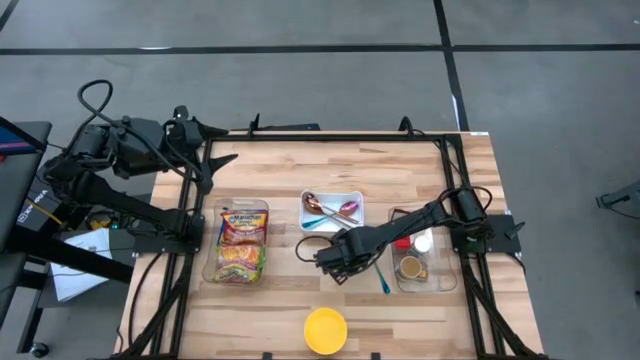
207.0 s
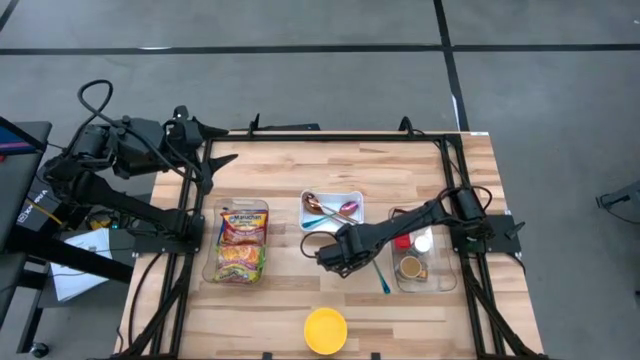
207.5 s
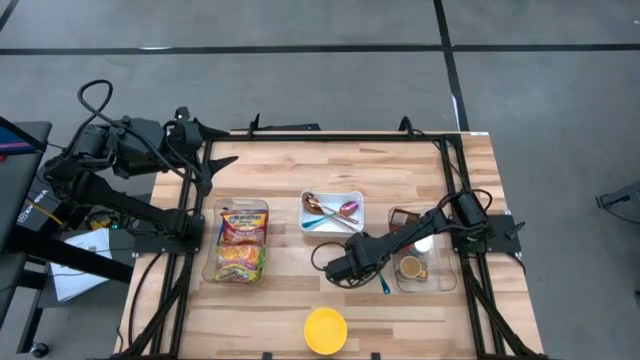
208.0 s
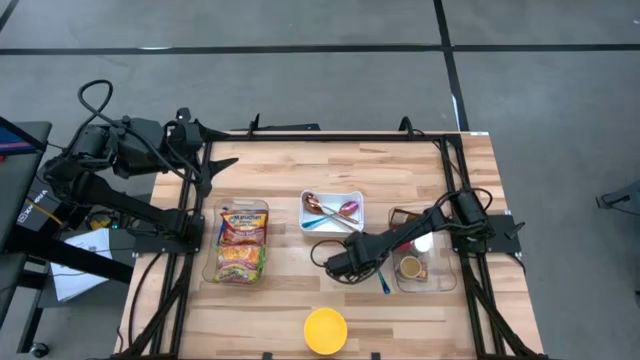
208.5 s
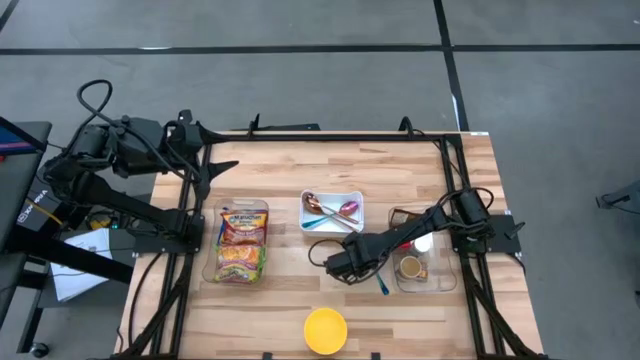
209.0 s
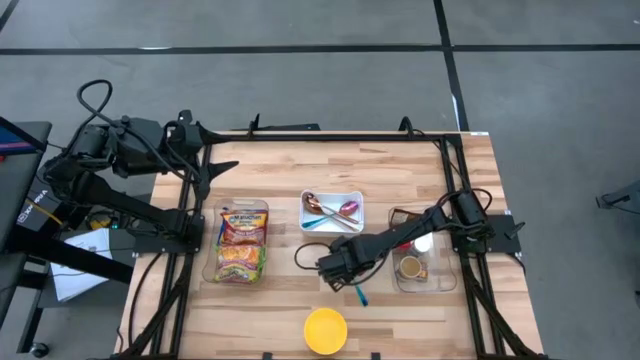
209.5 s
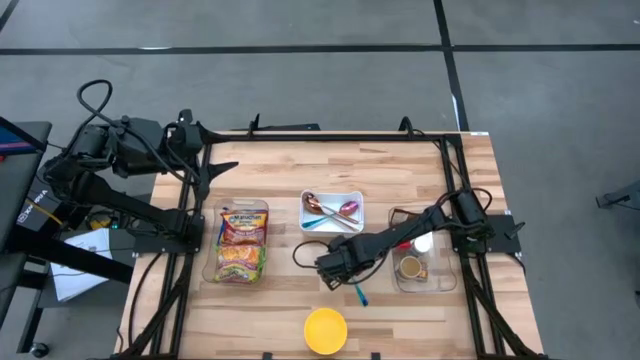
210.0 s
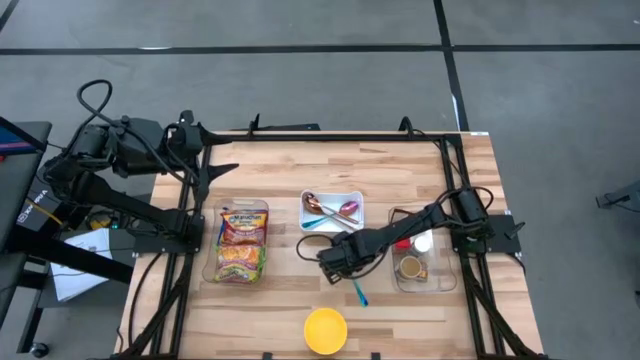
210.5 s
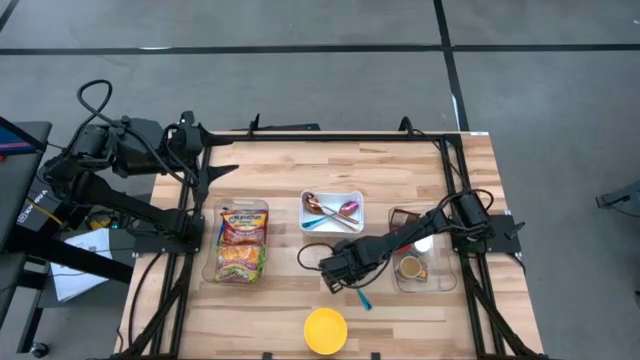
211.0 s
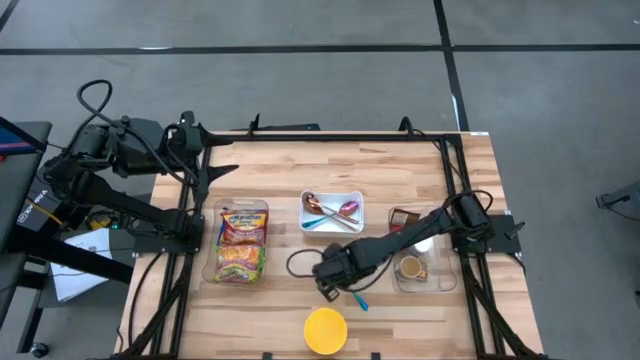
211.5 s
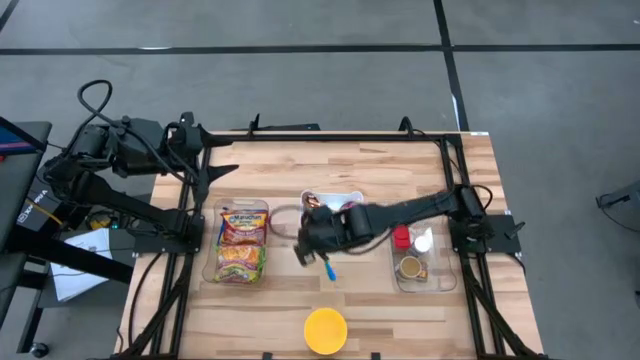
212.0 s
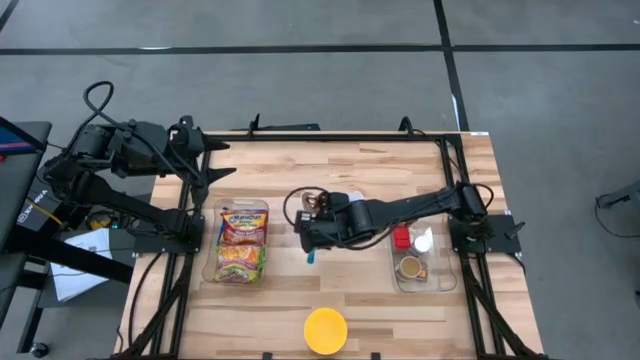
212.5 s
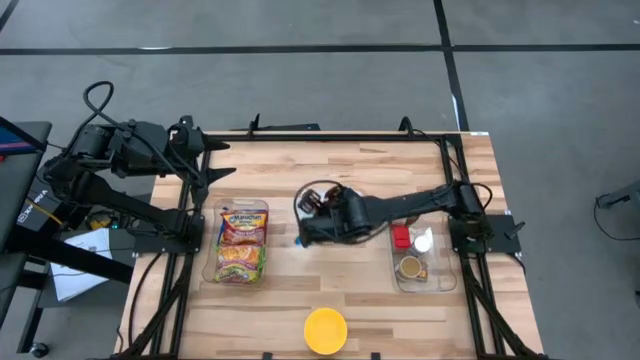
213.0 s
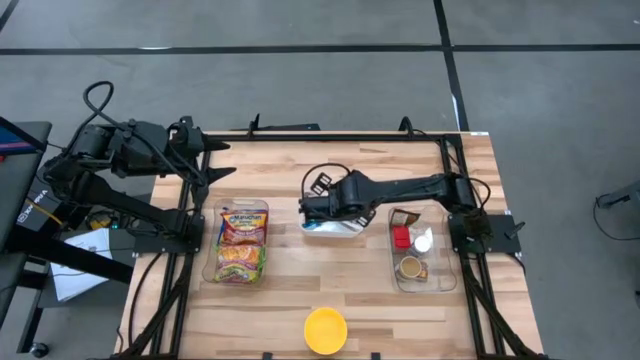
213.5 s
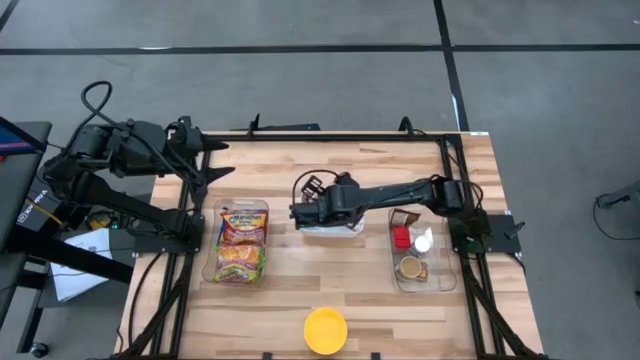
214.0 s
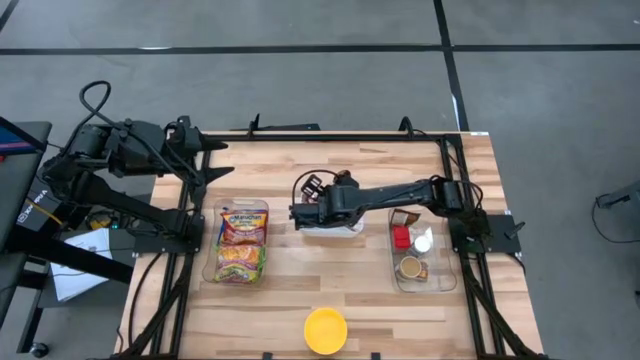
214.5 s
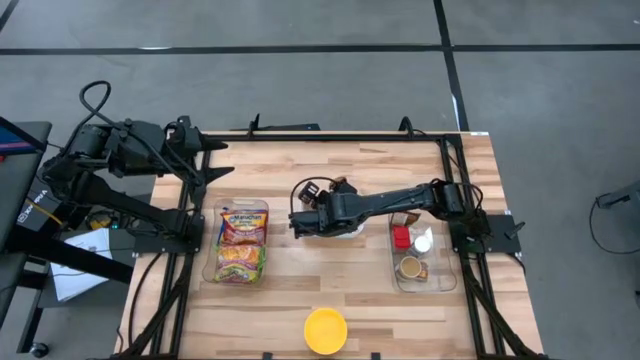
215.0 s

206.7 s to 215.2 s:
Task: Pick & Place Food Item
Put the violet spoon into the white bin

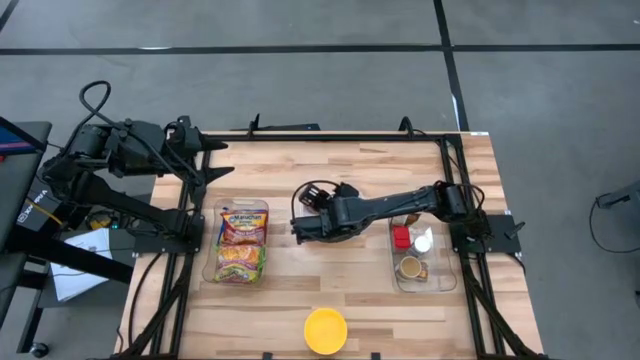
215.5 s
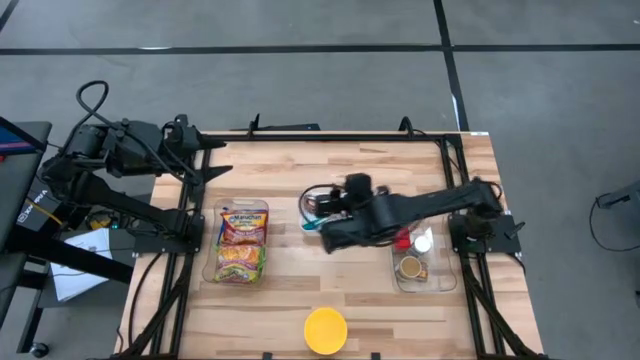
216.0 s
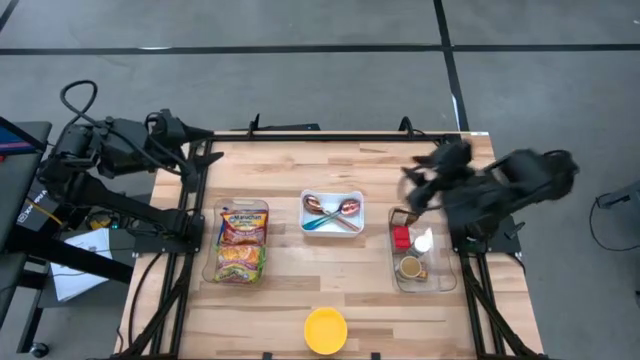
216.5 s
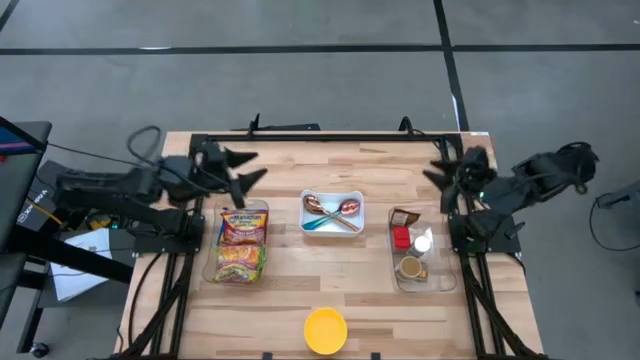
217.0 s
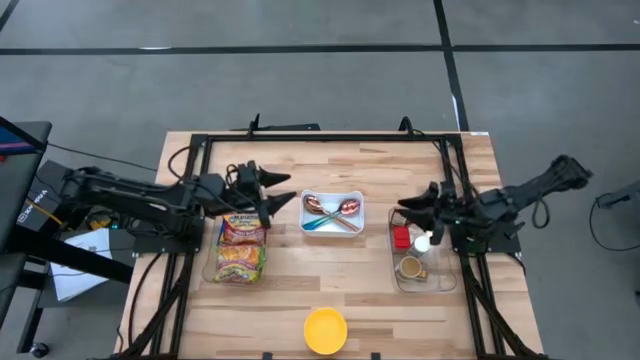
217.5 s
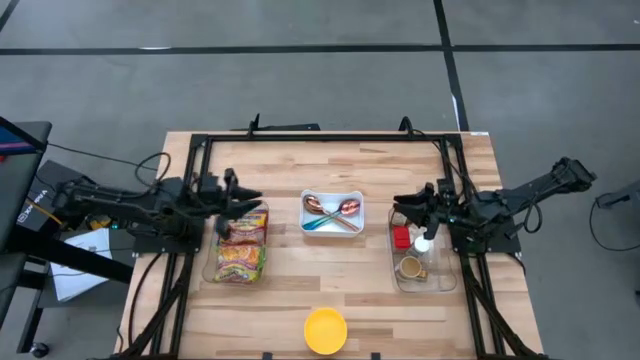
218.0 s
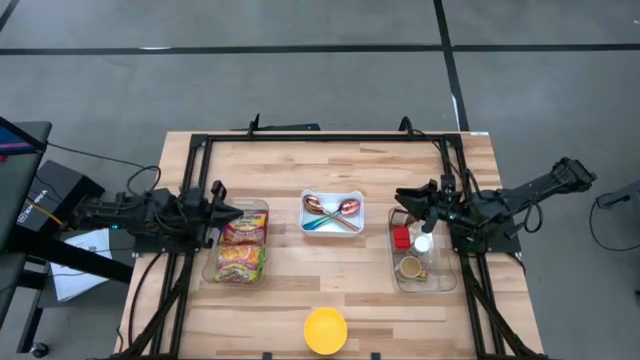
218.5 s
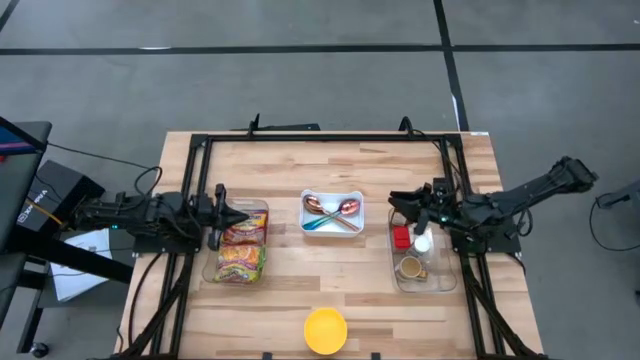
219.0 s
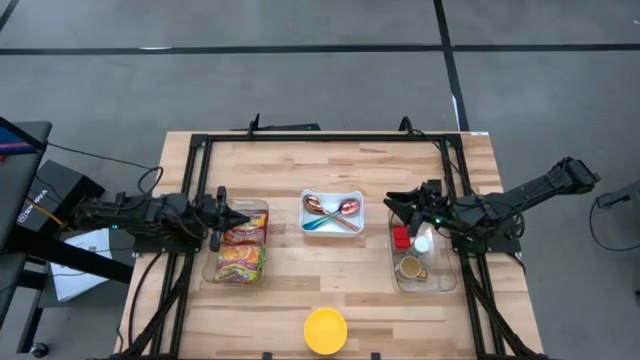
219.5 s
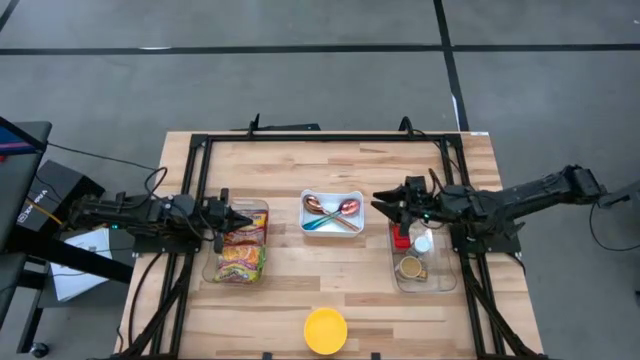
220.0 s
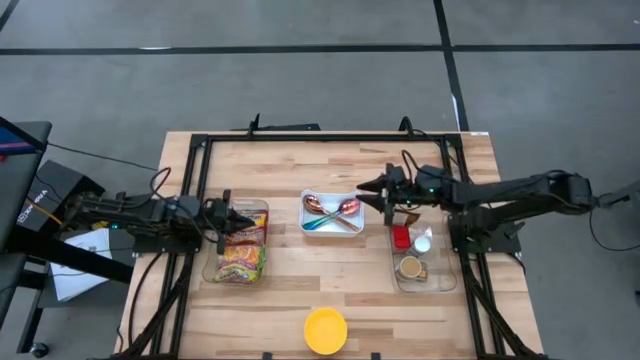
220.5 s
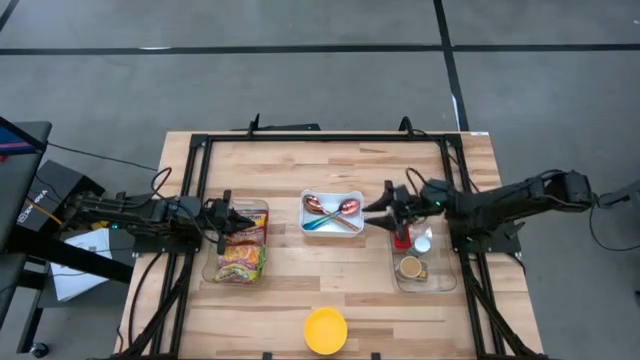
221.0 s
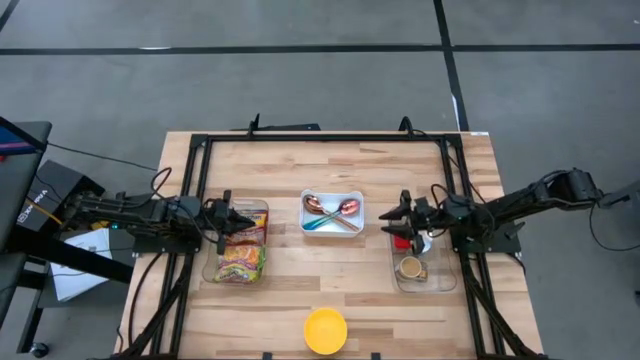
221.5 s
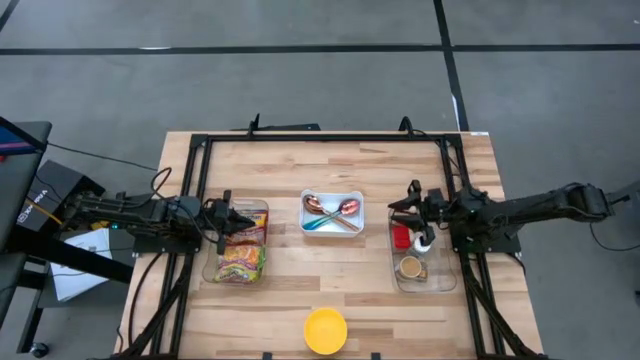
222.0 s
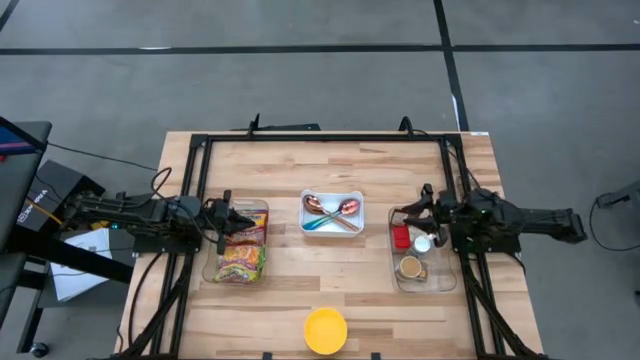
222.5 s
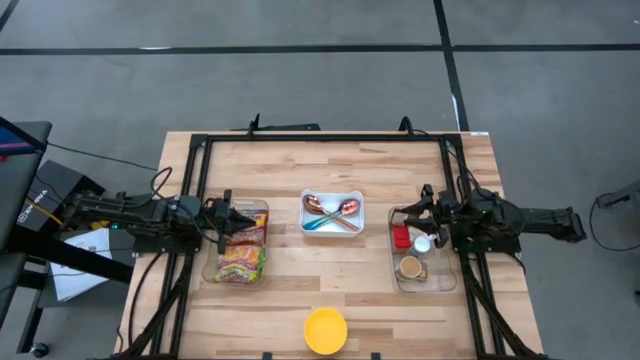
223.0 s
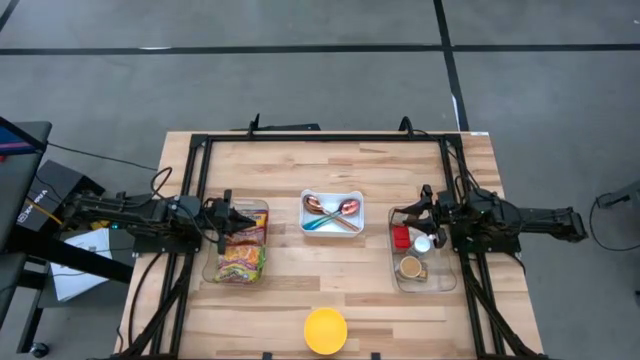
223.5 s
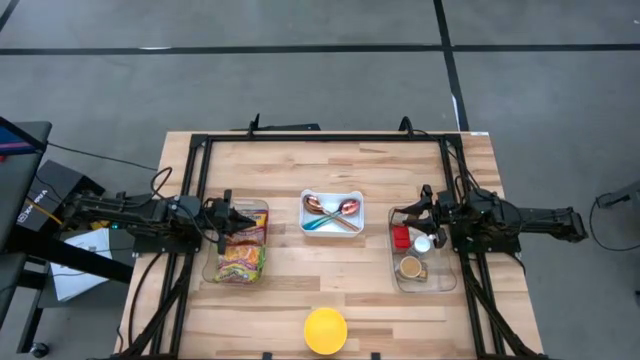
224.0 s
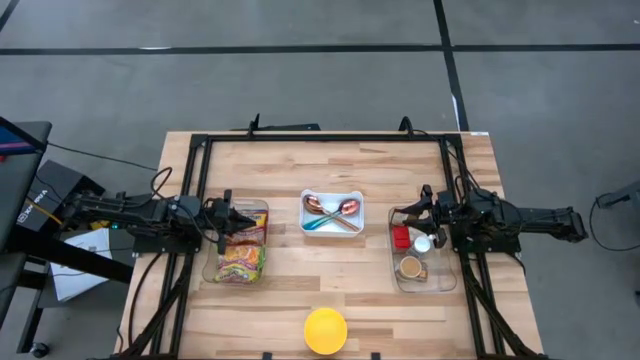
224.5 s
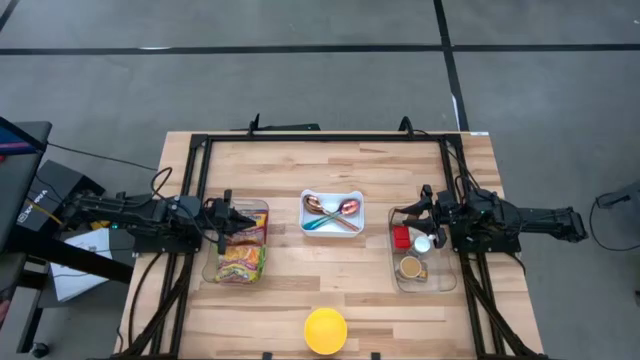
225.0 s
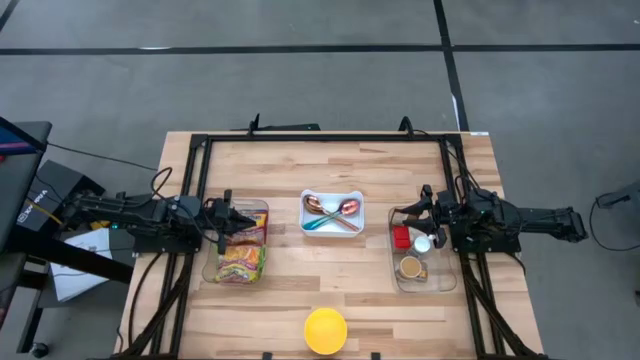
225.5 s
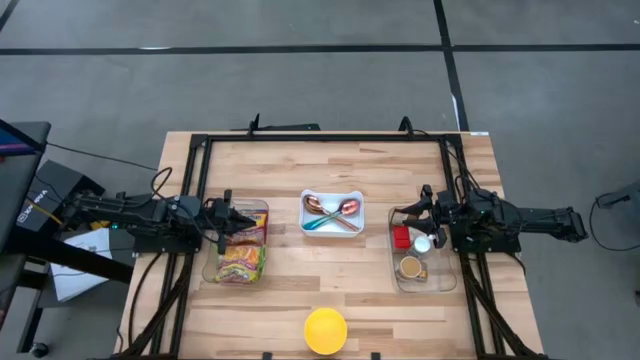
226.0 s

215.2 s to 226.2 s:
Return to Home Position

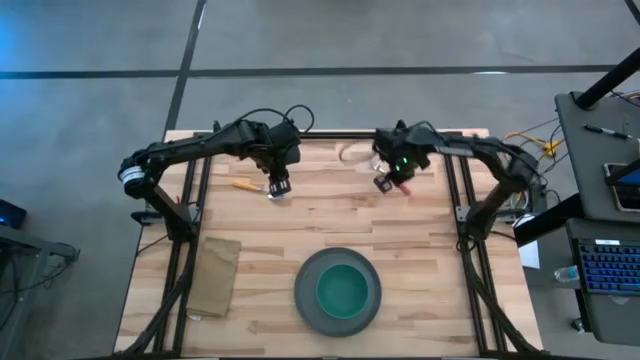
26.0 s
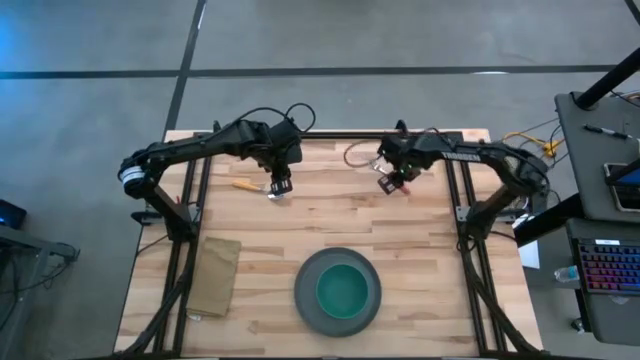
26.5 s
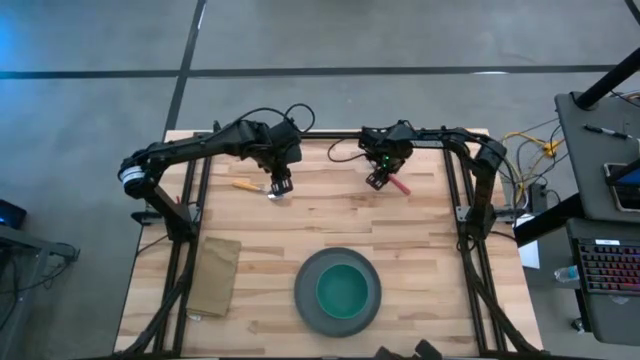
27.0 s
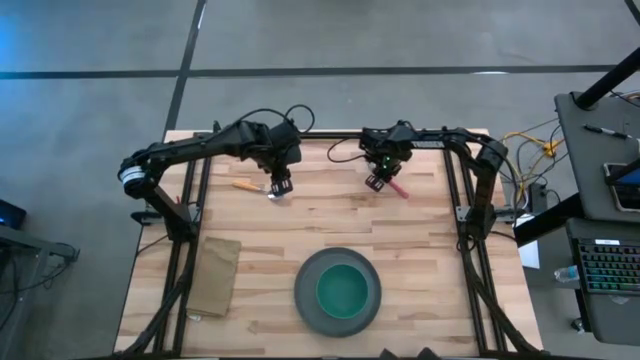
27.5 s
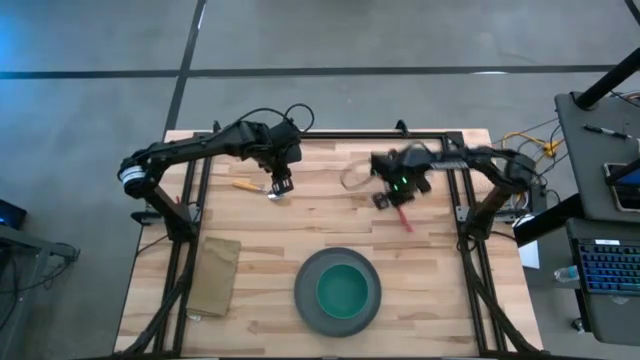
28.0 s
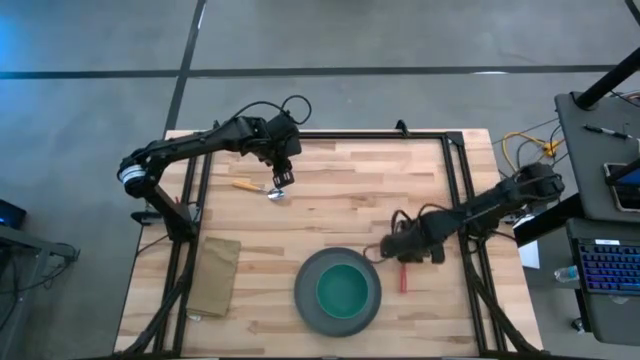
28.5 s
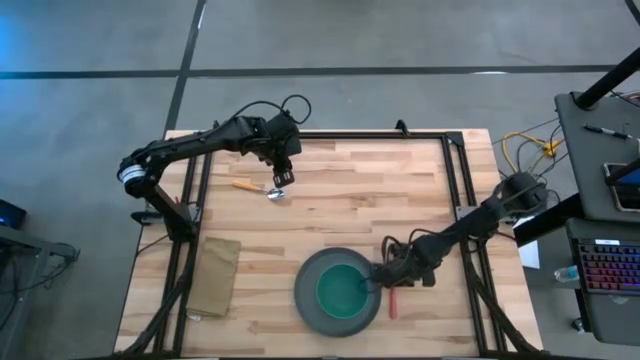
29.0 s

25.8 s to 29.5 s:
Task: Set table place
Put the fork to the right side of the plate
